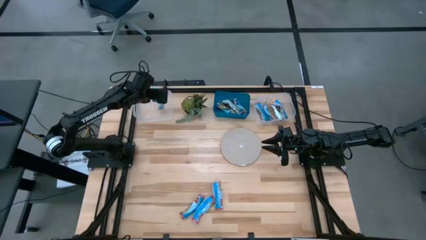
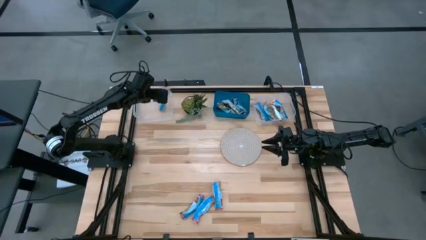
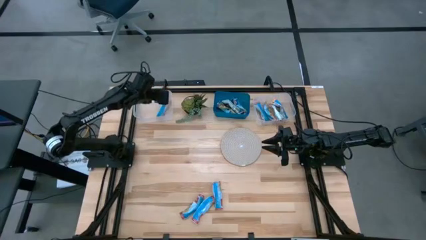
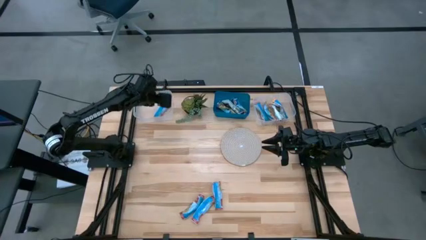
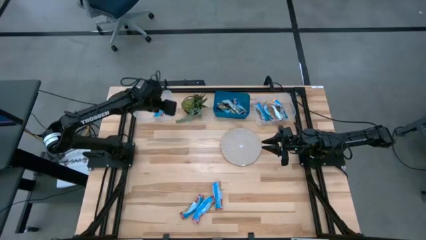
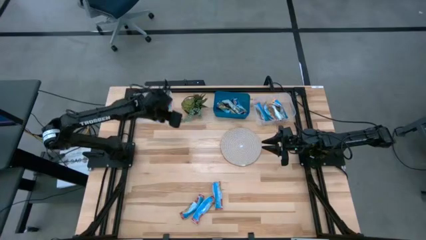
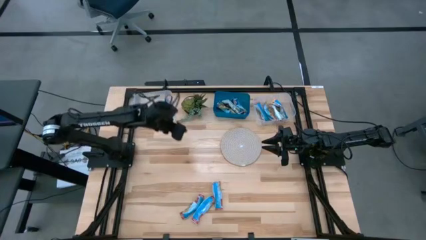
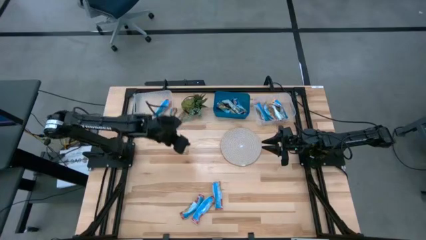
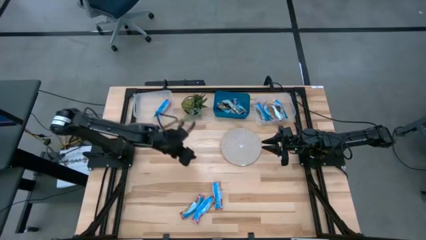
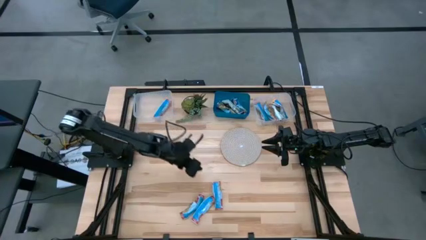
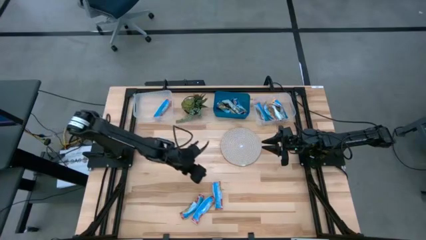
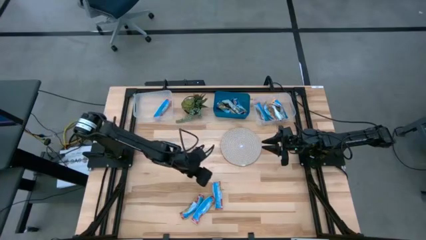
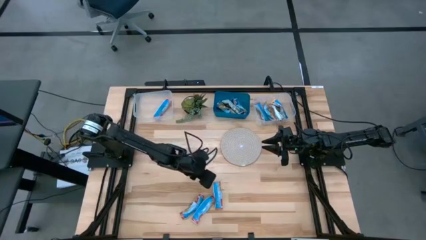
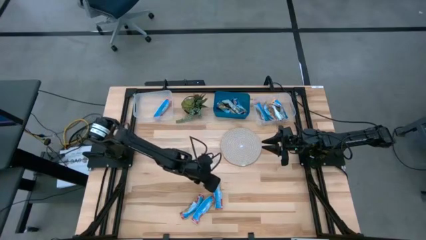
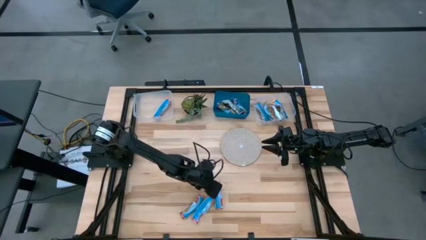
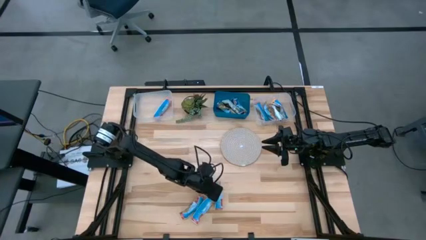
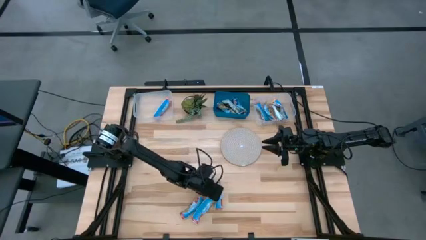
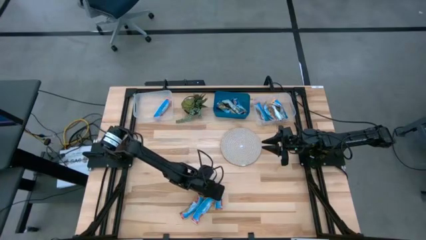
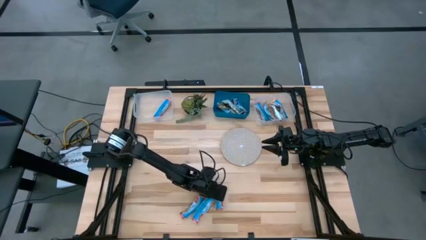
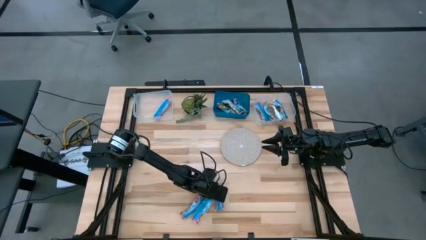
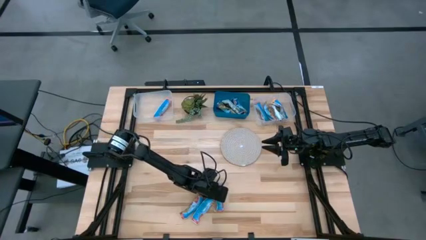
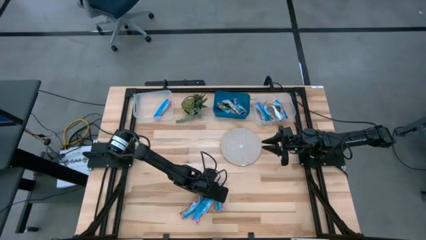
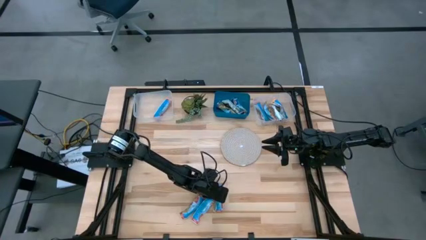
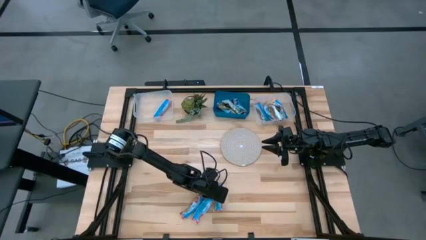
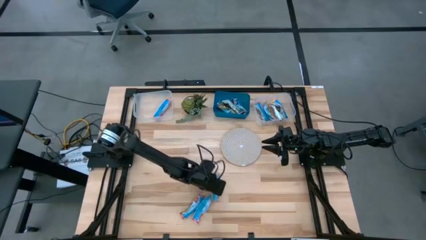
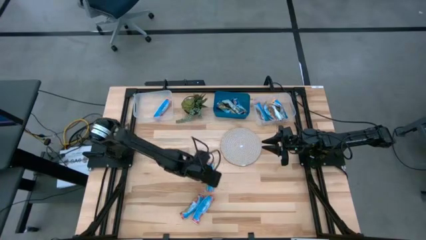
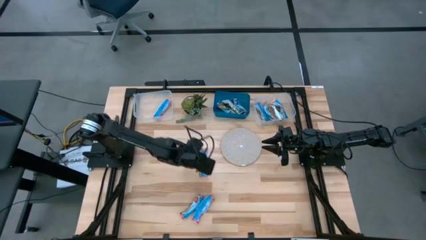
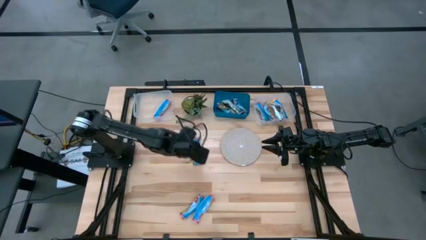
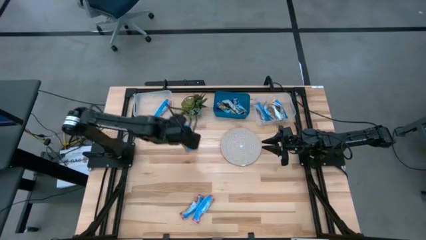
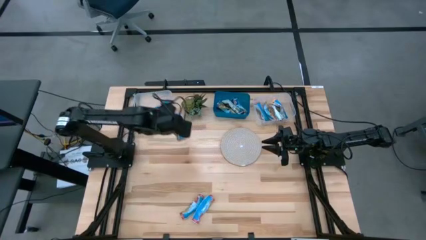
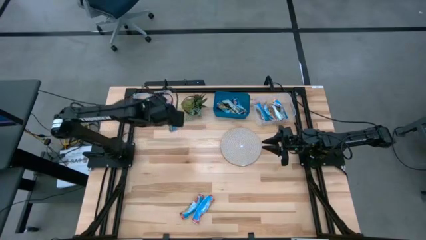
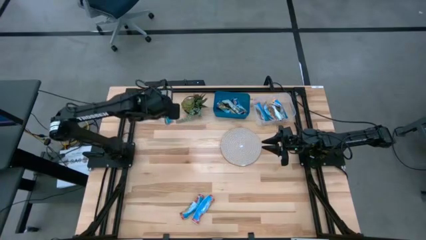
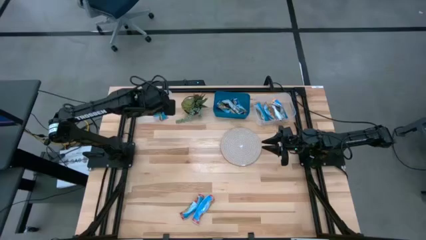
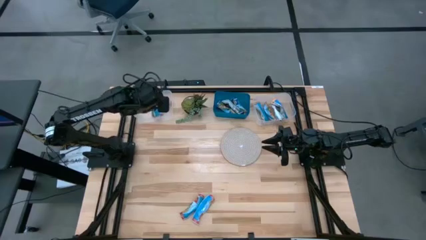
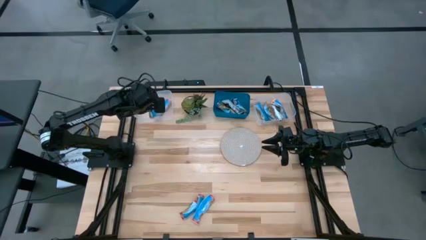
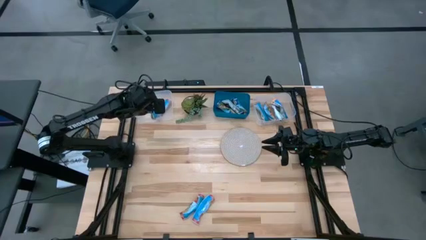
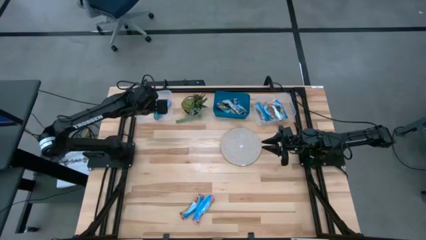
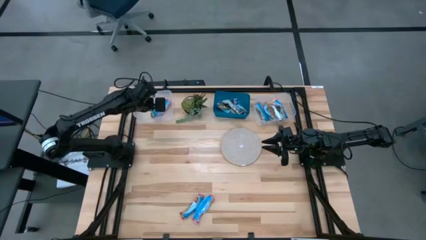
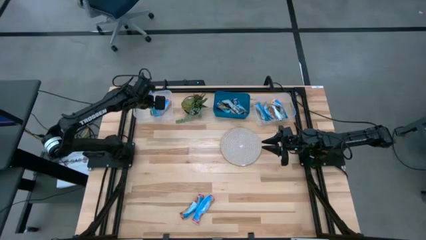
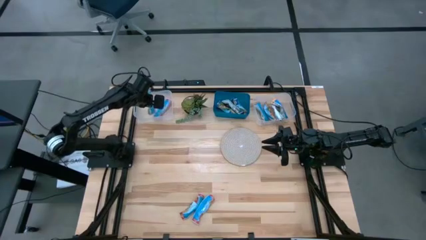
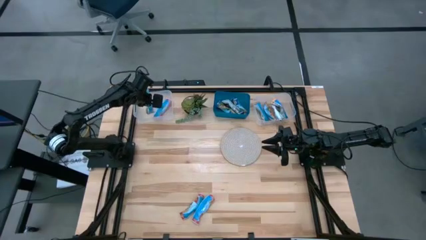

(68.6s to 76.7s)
Task: Pick and place Granola Bars by type
Put the red granola bar into the left transparent bin

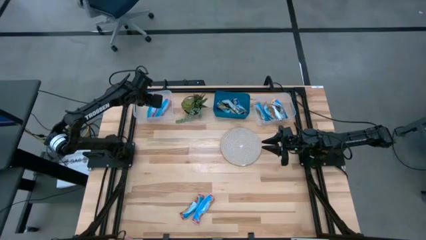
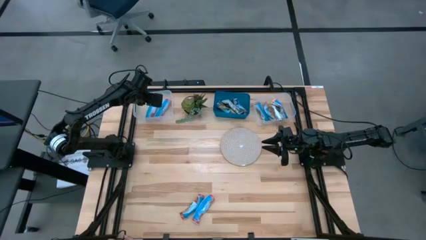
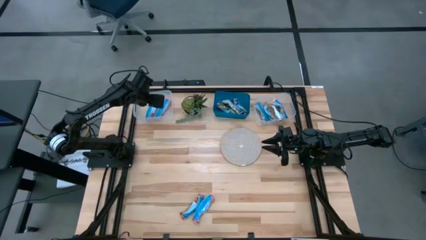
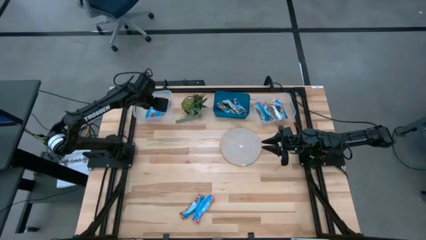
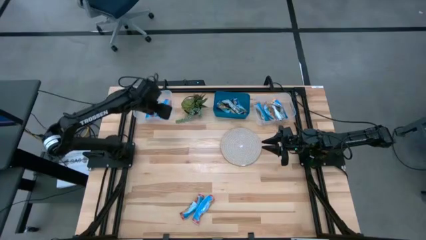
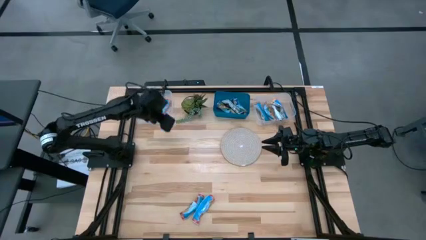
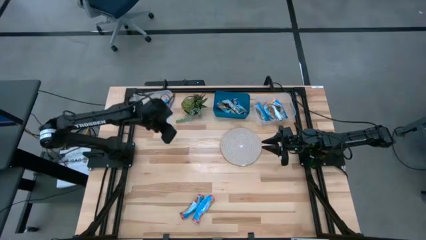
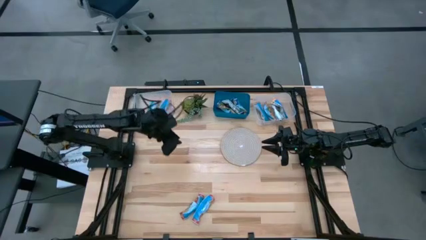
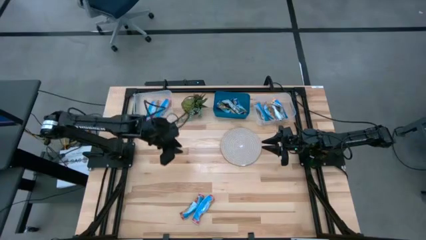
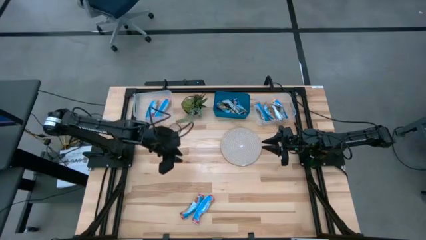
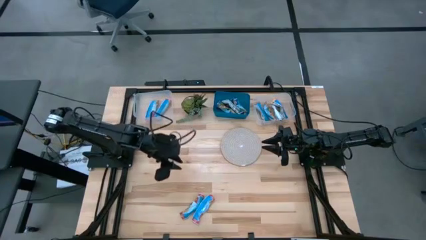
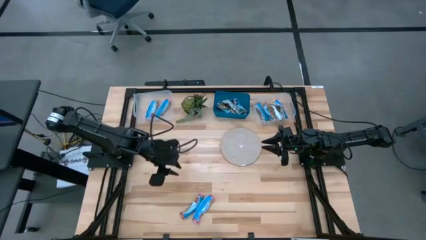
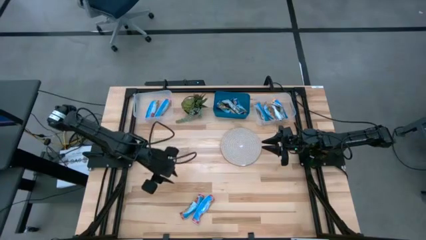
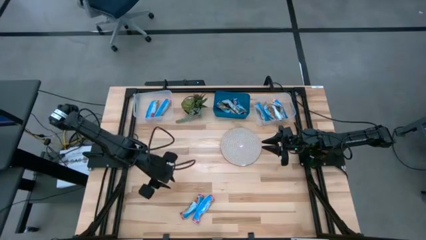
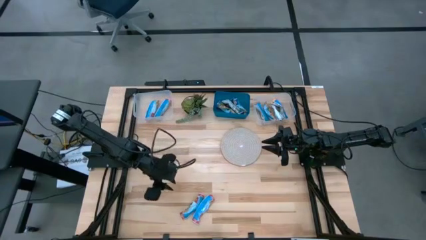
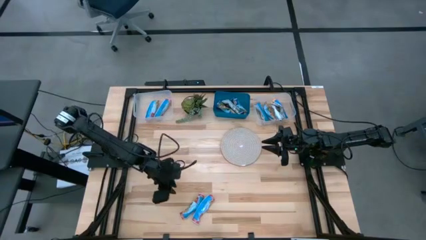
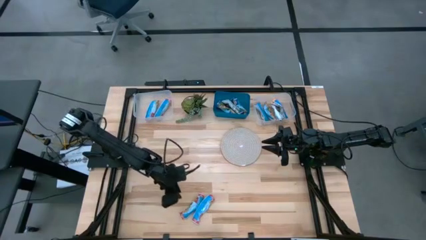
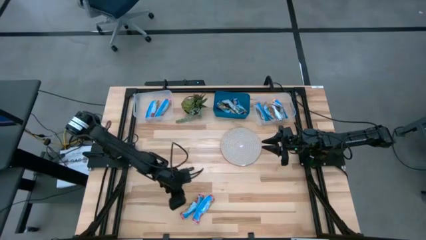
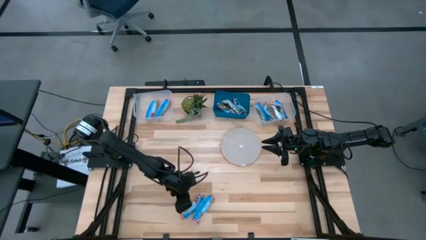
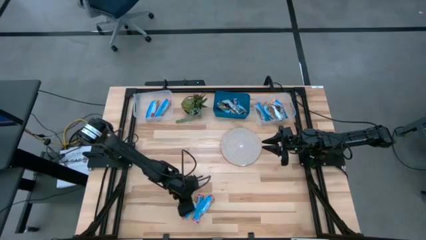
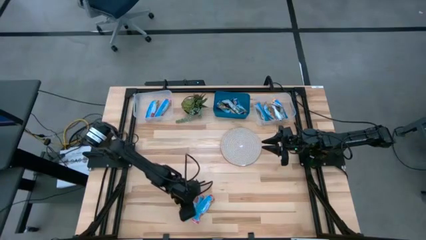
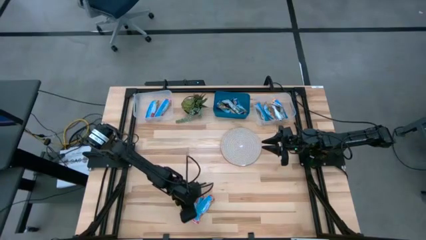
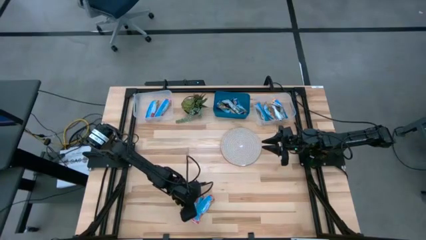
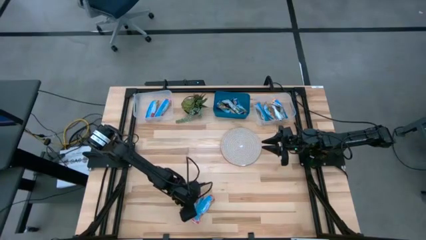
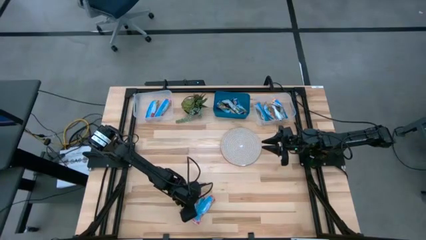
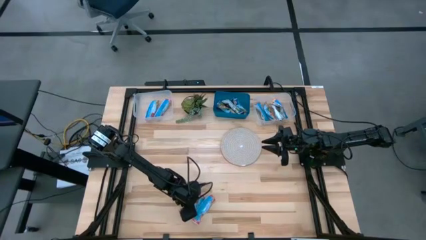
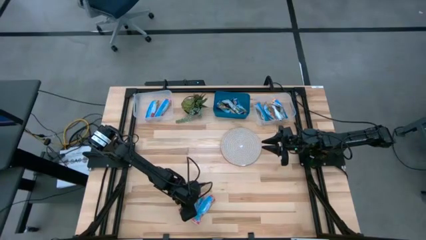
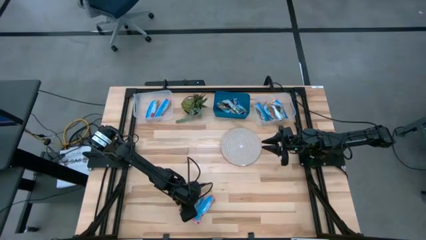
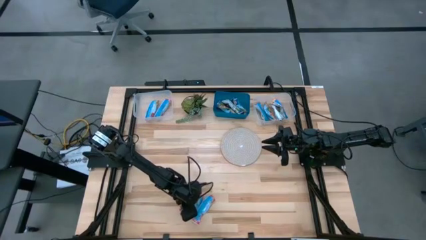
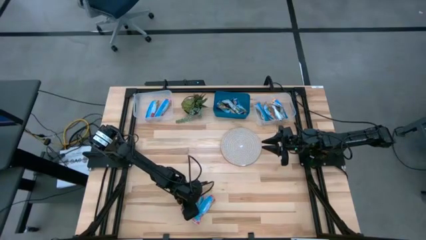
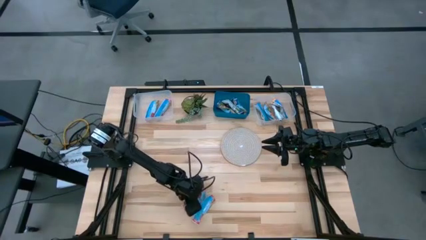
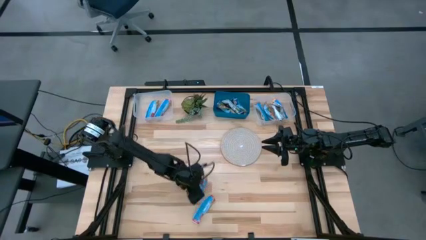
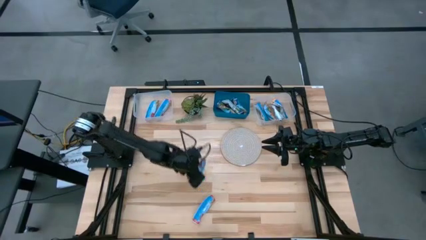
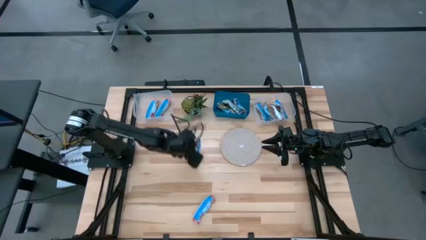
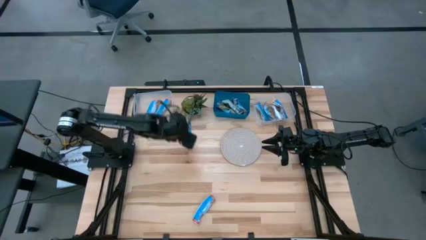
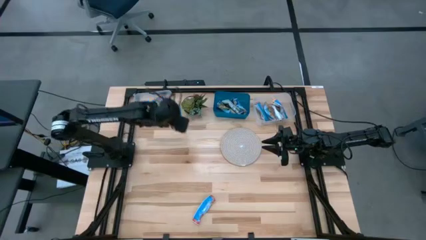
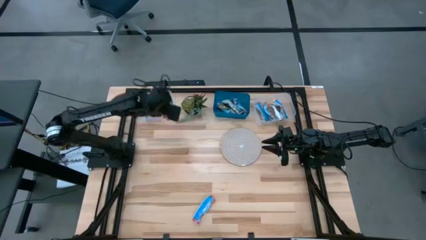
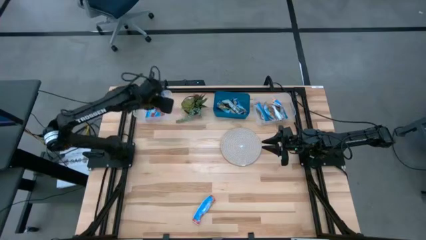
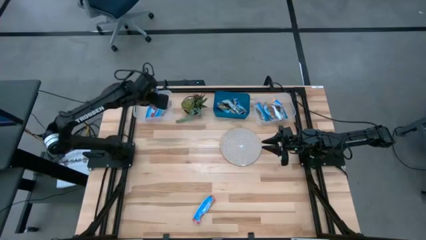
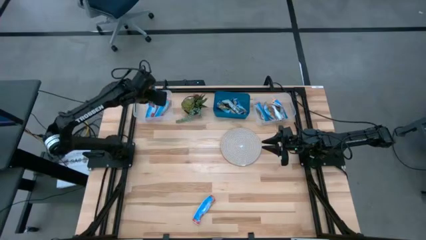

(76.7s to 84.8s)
Put the red granola bar into the left transparent bin
